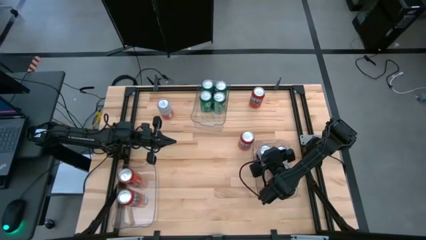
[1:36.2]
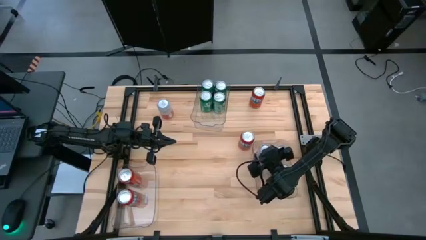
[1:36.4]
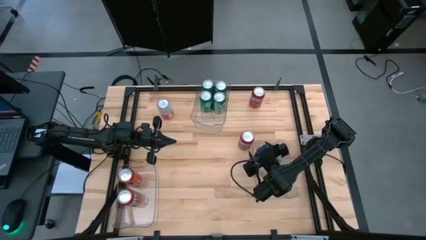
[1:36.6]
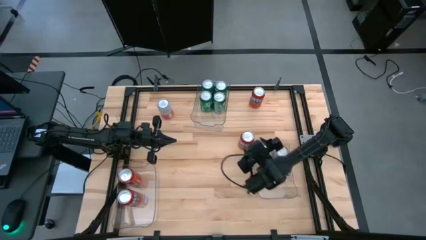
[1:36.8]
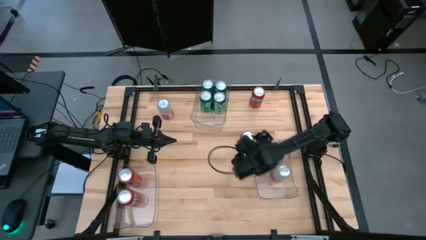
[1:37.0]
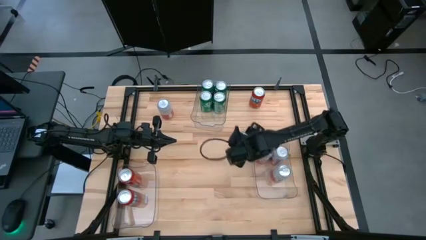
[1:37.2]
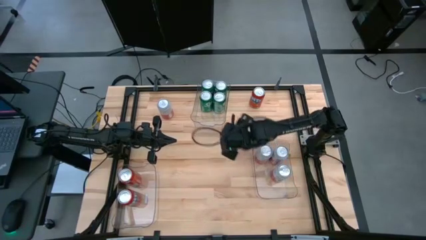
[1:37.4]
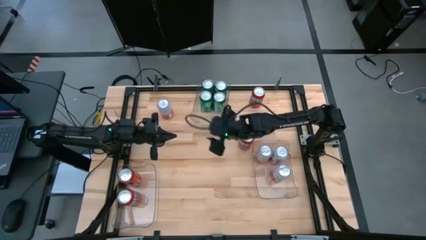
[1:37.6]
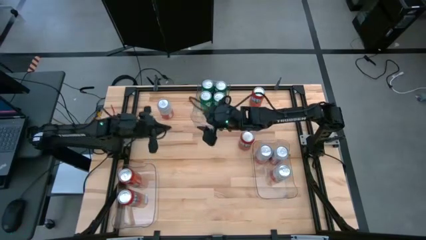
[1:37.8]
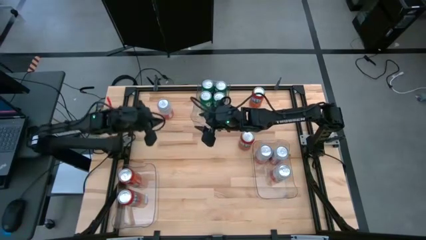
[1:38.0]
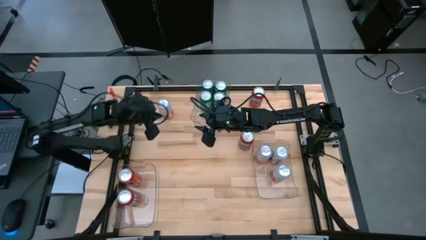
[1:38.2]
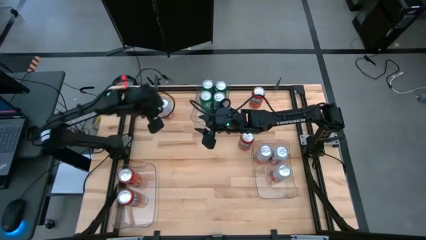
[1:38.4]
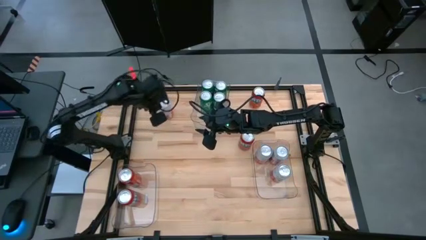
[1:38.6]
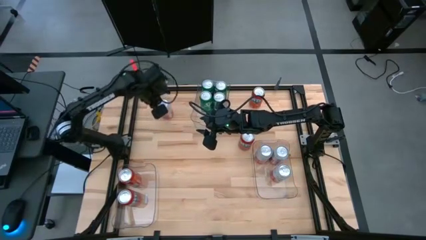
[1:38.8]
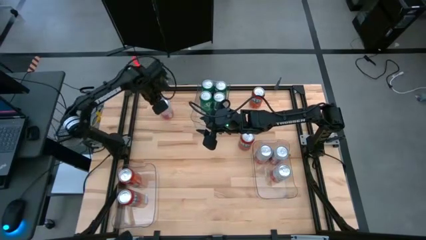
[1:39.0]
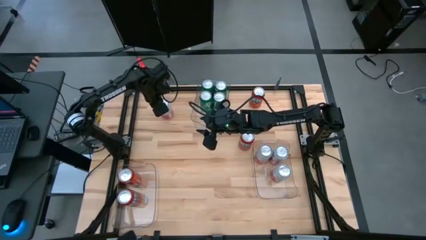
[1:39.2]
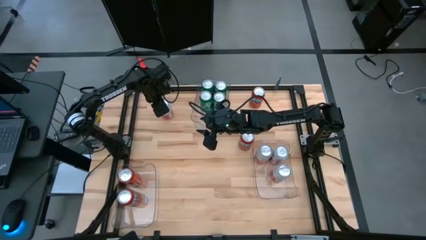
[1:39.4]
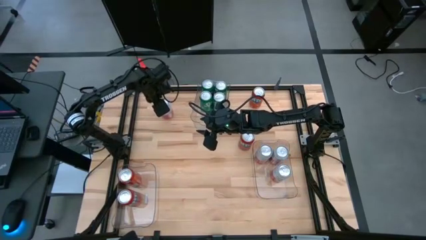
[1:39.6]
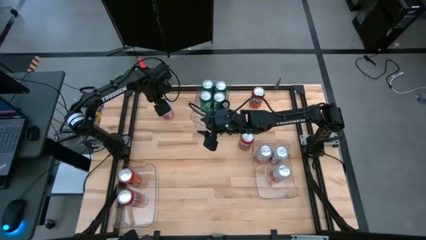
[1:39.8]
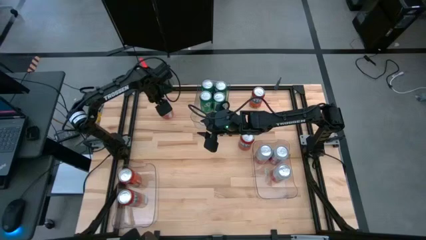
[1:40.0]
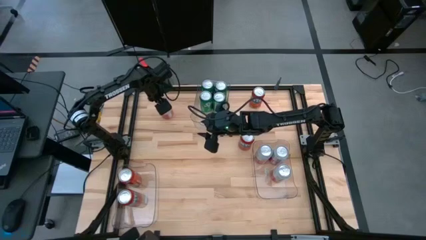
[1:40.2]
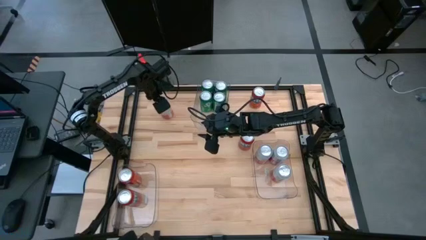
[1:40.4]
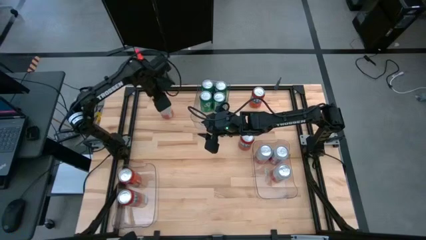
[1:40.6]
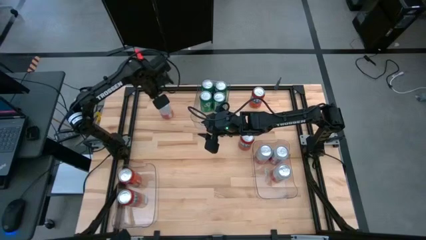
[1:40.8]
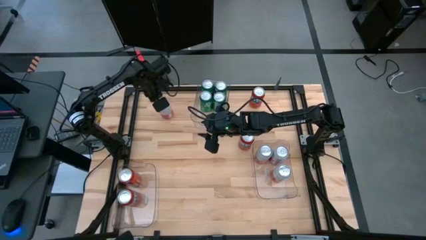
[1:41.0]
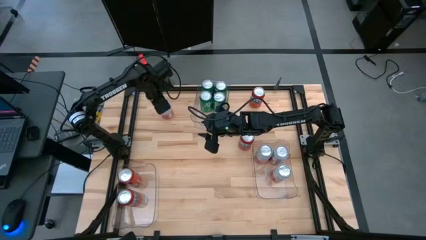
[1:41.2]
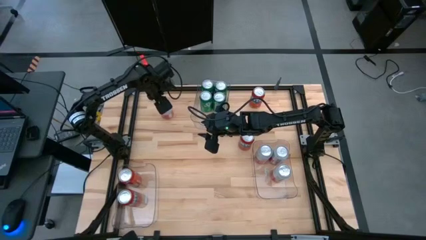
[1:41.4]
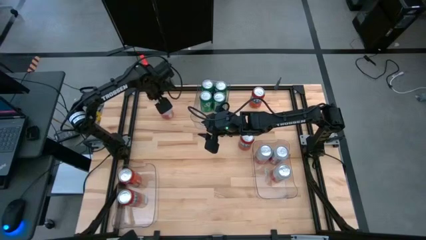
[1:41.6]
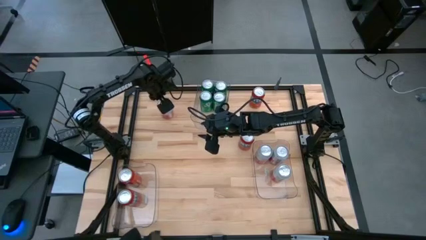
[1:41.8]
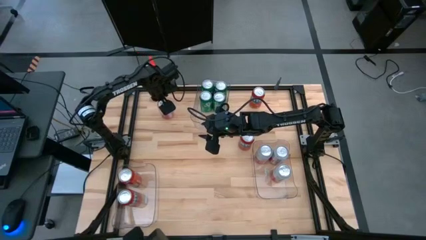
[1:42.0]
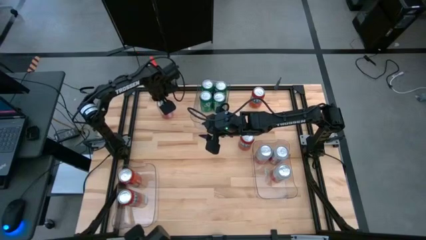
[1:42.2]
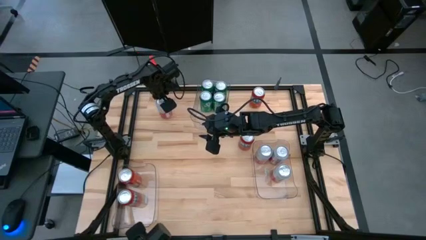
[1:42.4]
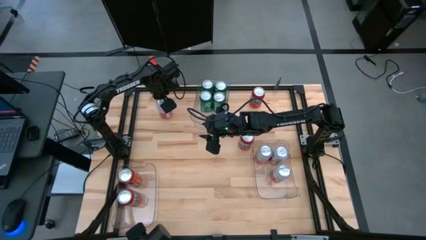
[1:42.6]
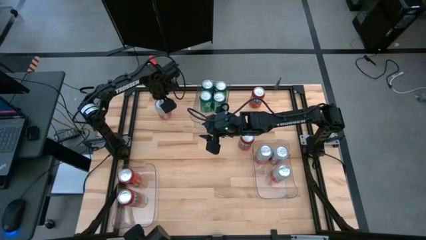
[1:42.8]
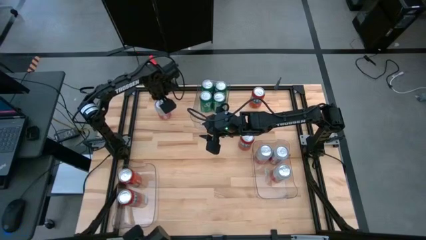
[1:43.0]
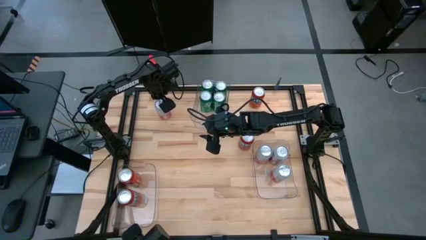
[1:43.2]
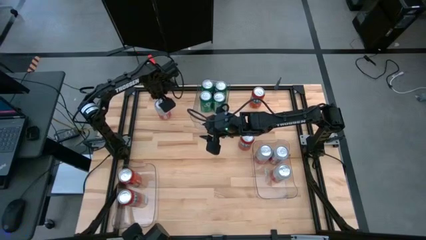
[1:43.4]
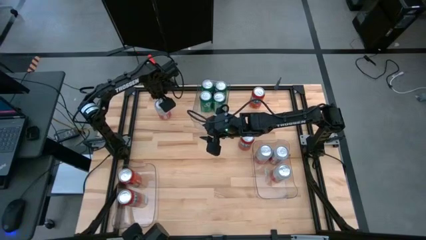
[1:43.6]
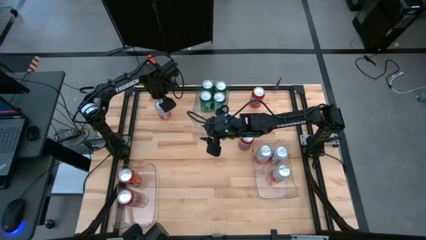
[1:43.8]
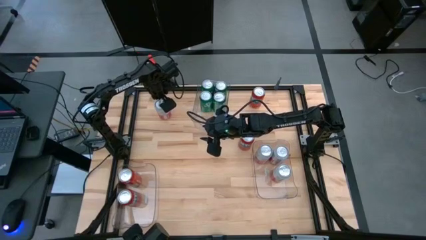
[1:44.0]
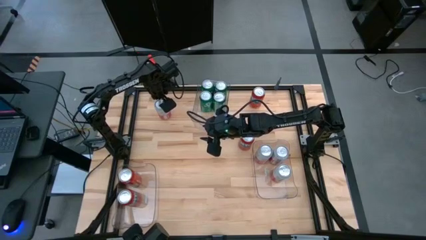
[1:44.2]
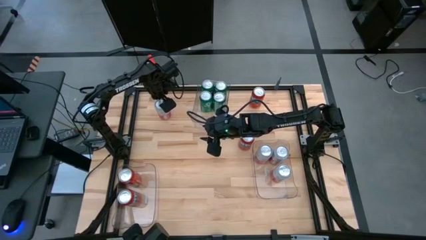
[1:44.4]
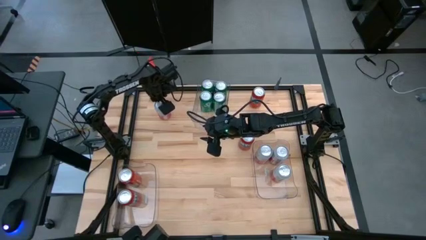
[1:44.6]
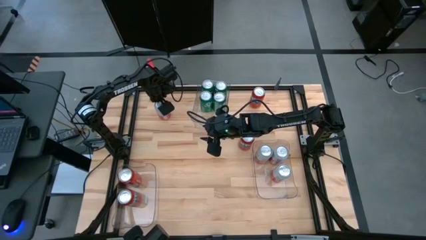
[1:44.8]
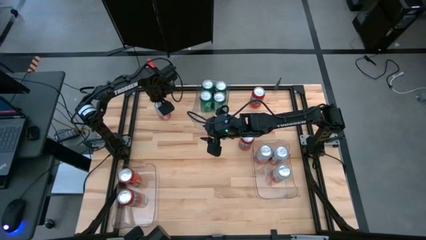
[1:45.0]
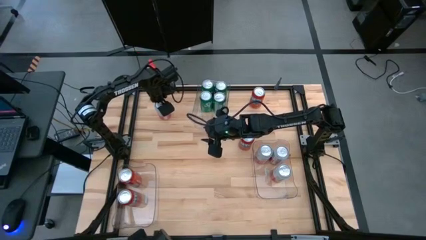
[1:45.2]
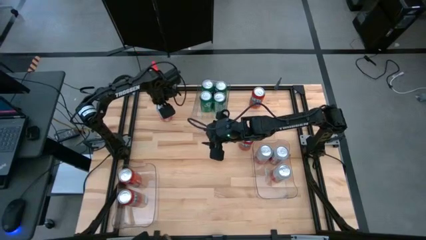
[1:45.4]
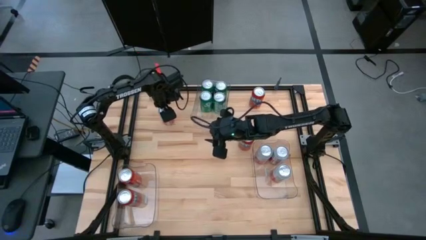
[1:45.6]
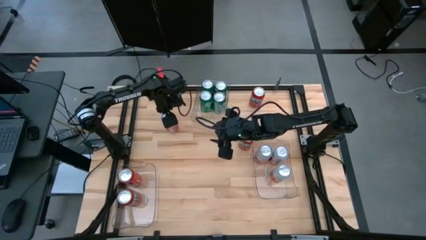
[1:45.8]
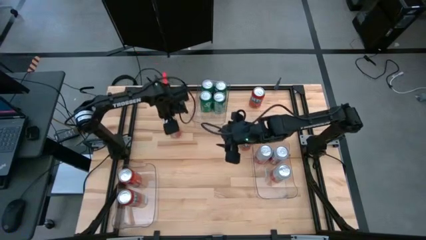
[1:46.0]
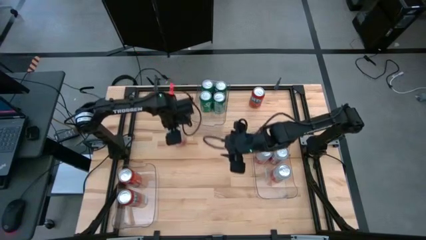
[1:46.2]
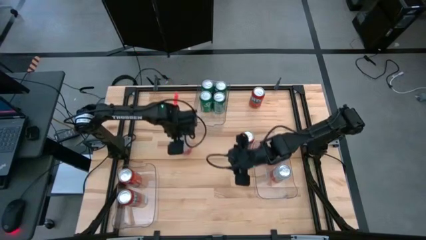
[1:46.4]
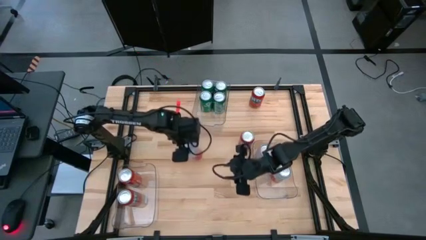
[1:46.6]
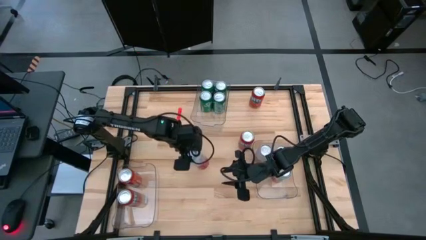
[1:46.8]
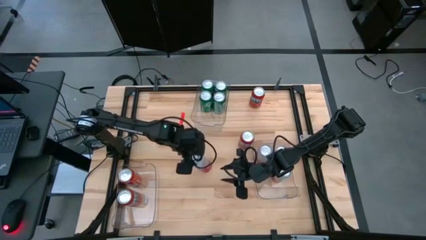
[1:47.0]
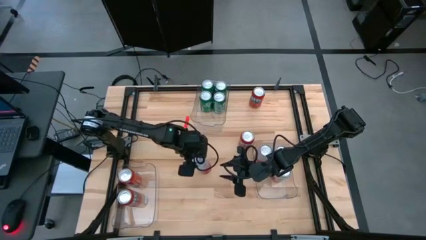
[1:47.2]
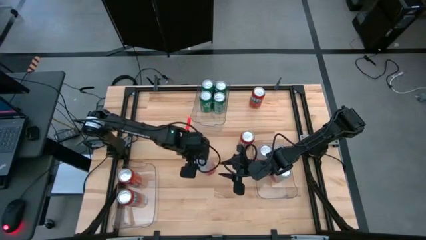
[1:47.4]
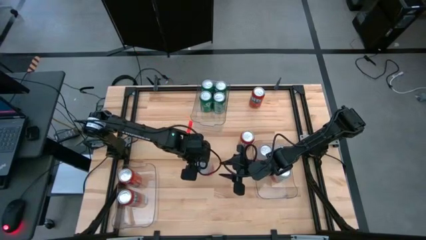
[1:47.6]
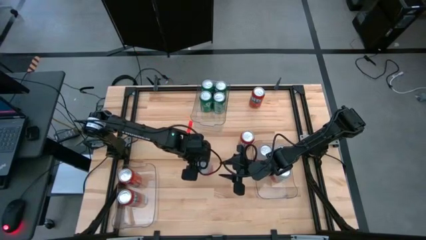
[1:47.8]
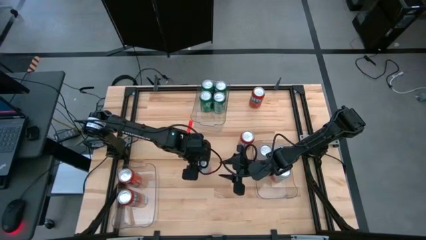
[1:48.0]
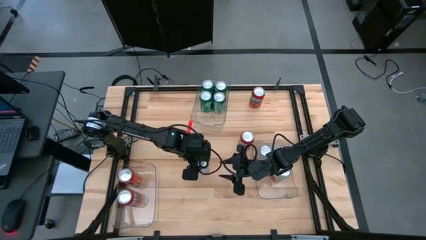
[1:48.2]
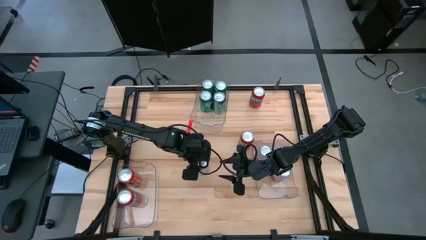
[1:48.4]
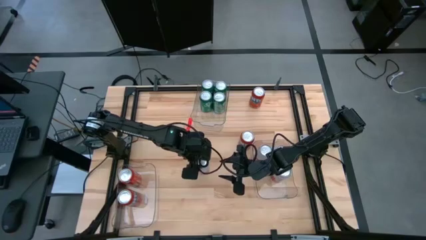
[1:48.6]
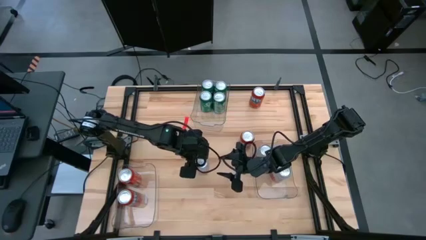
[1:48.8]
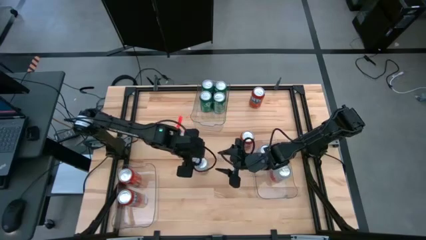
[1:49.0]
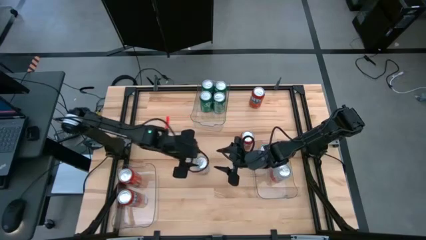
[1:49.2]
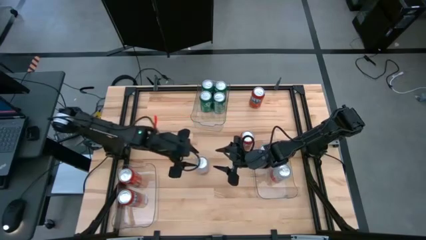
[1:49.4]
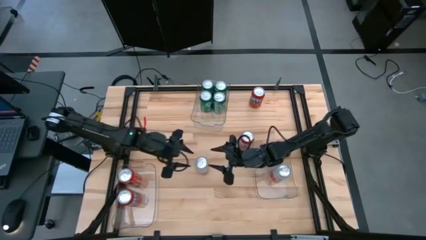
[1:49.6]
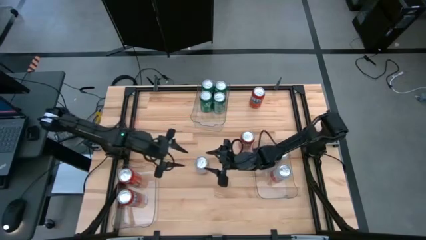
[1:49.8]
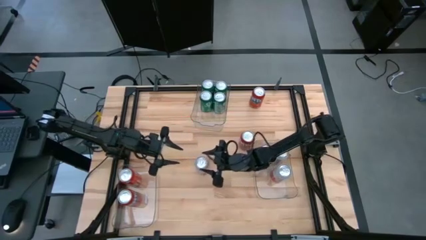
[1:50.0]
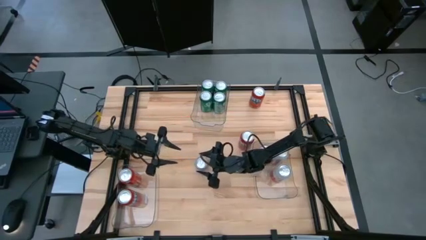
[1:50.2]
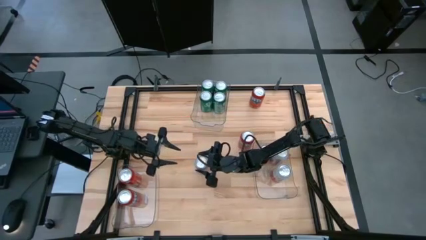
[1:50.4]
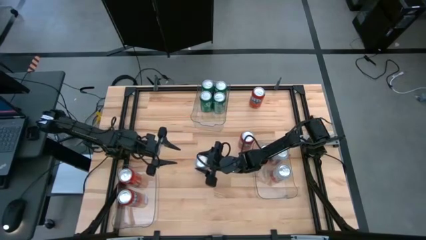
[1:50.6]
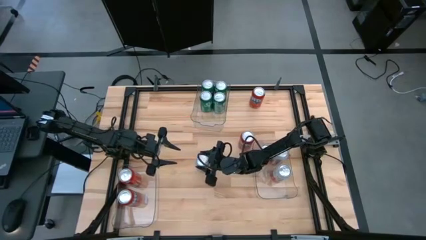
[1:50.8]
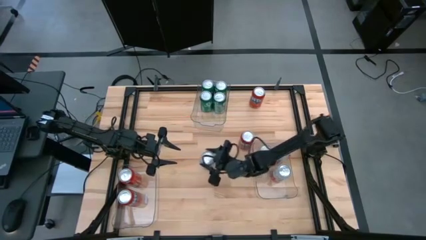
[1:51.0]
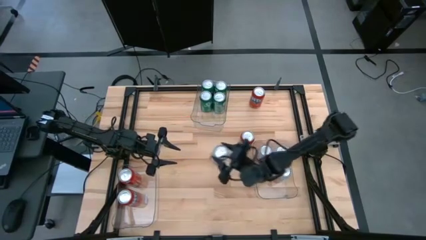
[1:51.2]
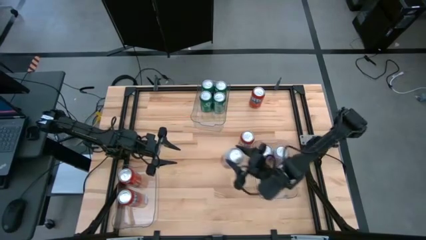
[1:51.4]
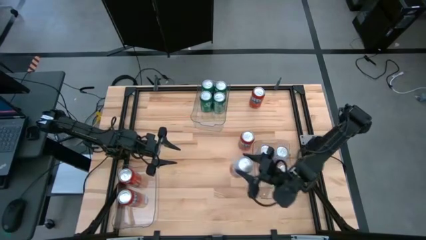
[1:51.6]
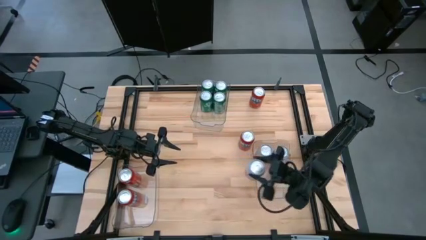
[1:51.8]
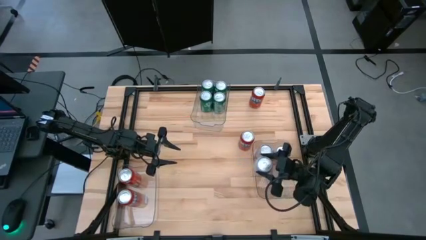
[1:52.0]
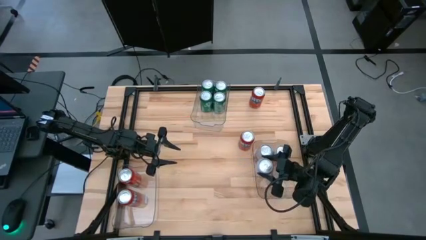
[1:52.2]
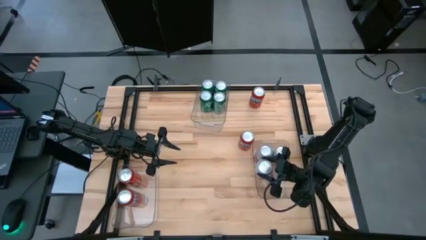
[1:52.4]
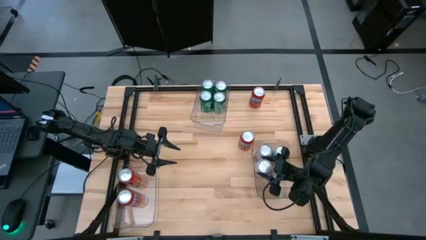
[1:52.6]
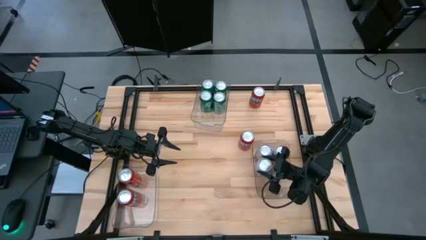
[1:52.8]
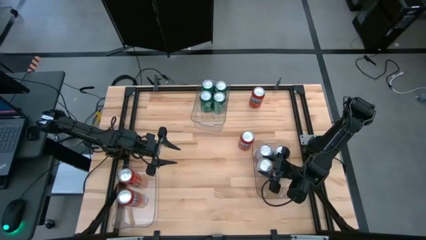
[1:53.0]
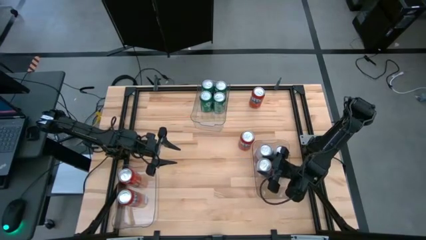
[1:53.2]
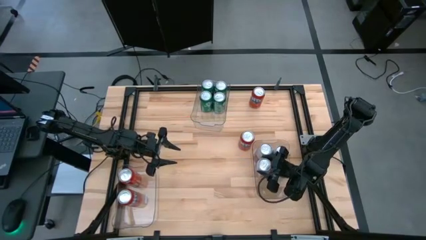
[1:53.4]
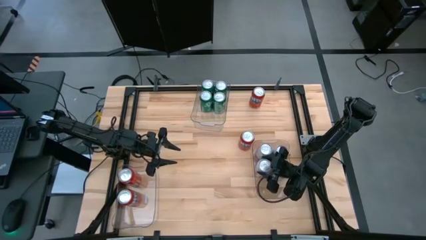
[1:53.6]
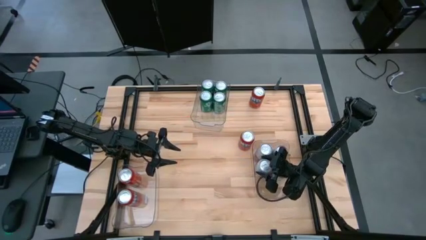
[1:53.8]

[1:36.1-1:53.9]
Task: Sort soda cans
Put the pink and white soda can into the bottom right transparent bin
